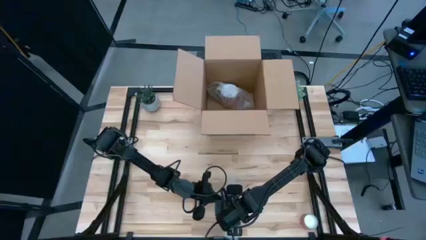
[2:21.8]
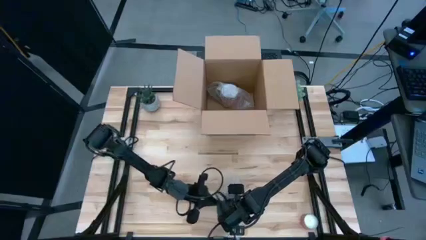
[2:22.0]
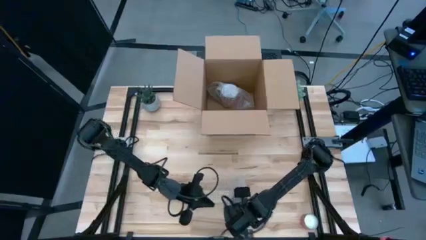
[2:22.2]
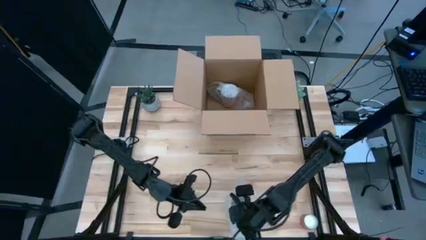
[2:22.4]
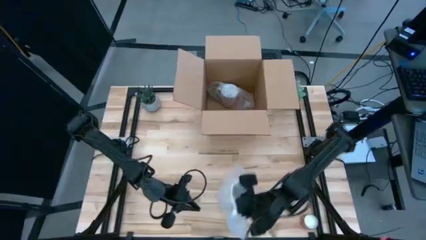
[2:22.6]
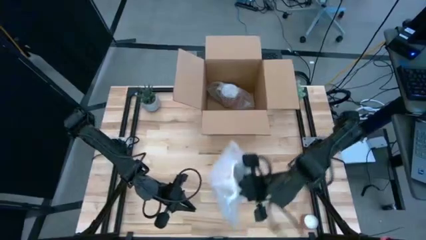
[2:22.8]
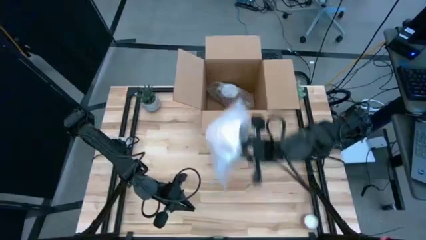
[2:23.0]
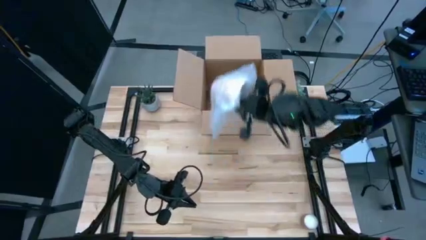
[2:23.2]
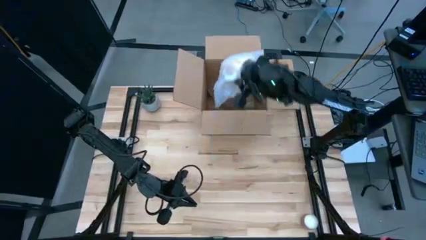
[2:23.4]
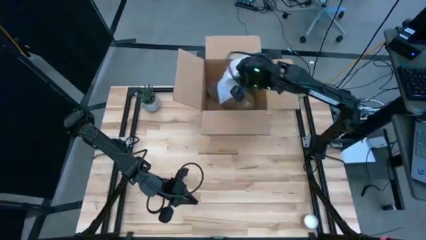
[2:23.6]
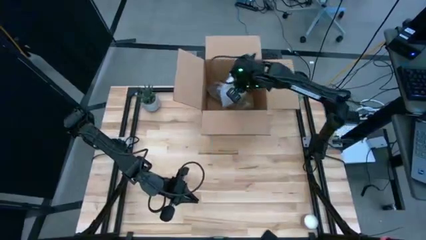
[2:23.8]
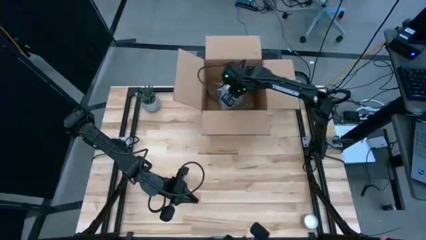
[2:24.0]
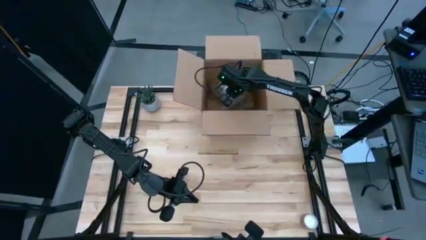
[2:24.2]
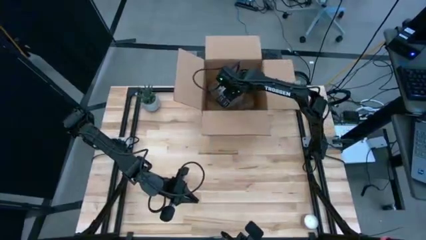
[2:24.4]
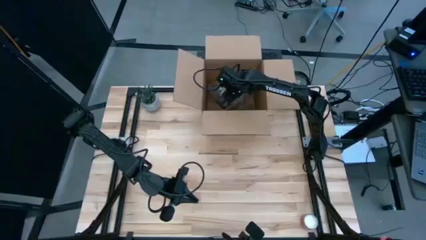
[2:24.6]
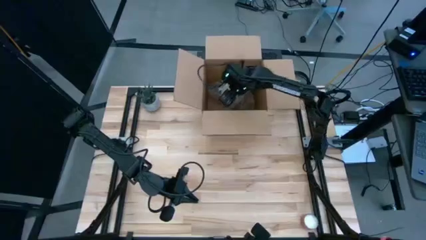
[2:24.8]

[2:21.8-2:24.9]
Task: wrap mug
Put the wrapped orange patterned mug into the cardboard box

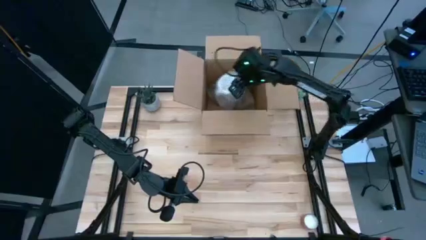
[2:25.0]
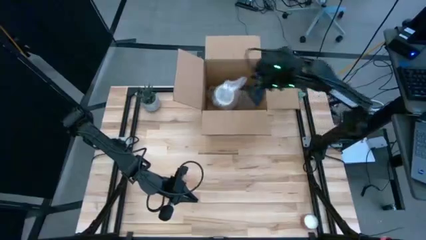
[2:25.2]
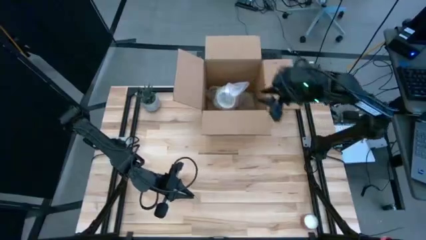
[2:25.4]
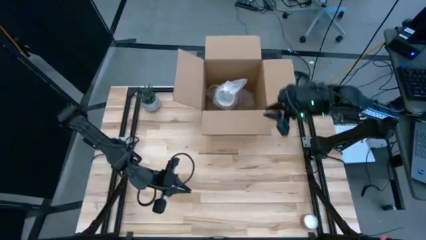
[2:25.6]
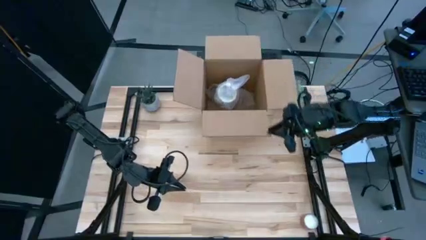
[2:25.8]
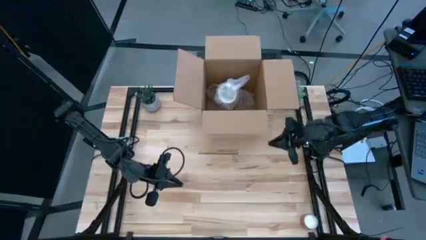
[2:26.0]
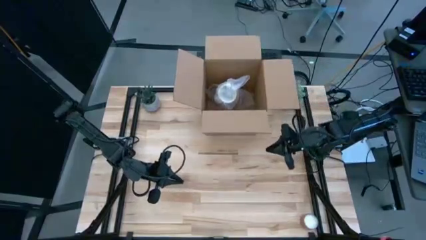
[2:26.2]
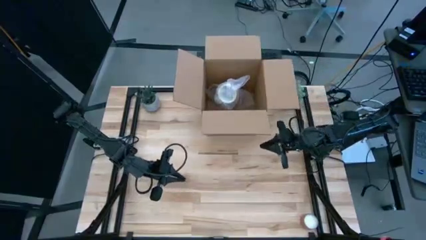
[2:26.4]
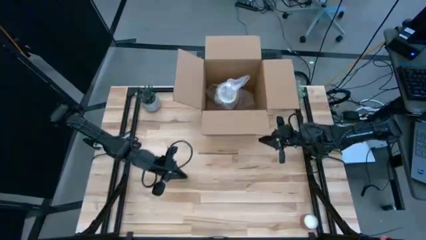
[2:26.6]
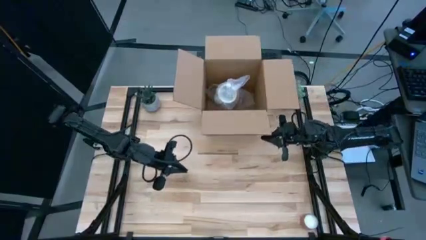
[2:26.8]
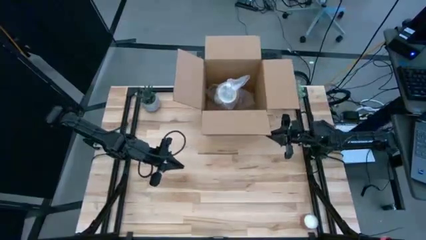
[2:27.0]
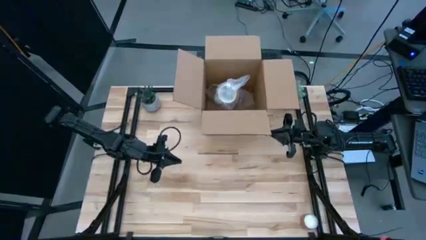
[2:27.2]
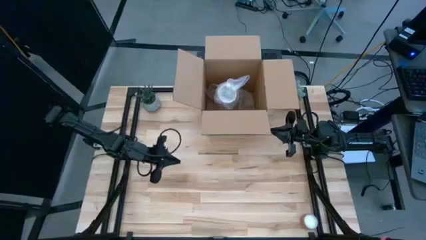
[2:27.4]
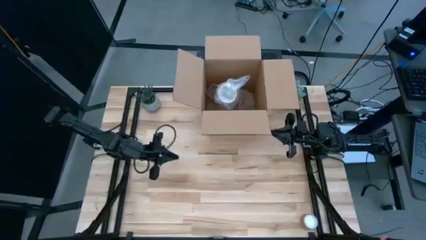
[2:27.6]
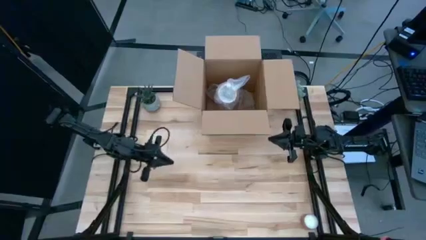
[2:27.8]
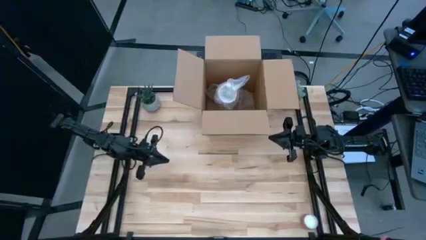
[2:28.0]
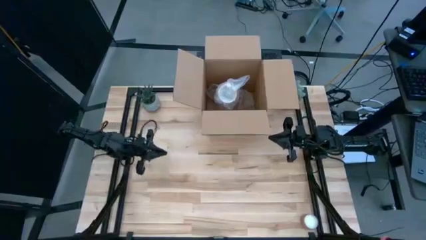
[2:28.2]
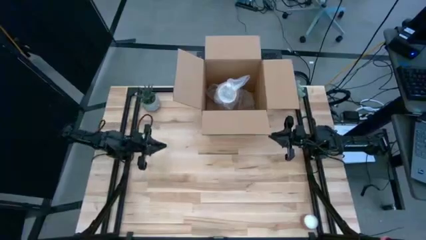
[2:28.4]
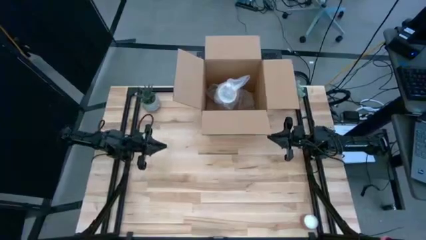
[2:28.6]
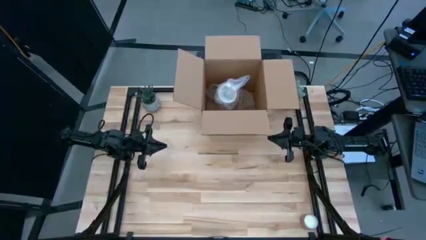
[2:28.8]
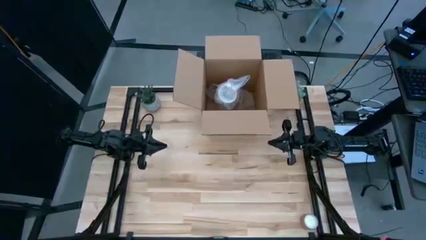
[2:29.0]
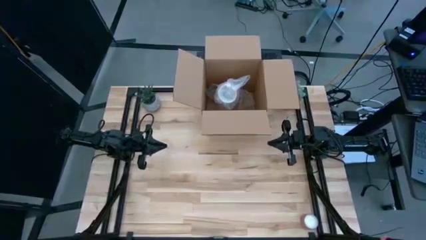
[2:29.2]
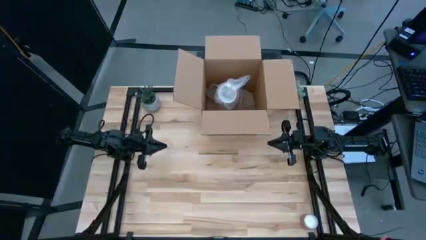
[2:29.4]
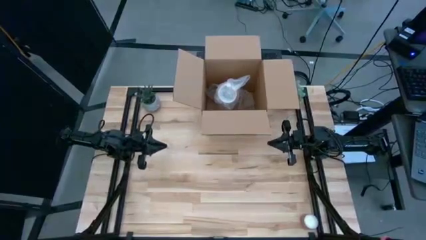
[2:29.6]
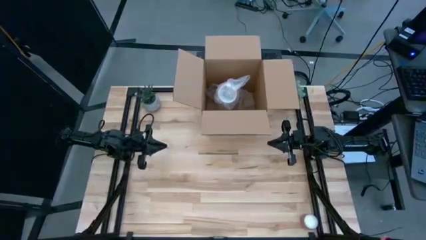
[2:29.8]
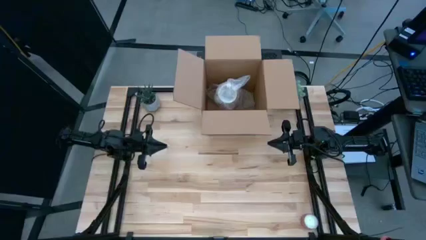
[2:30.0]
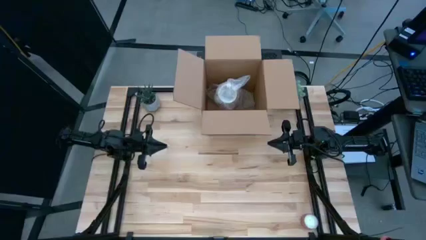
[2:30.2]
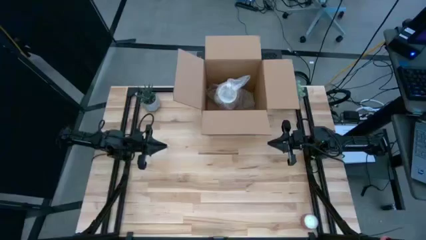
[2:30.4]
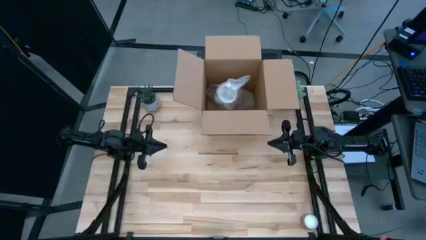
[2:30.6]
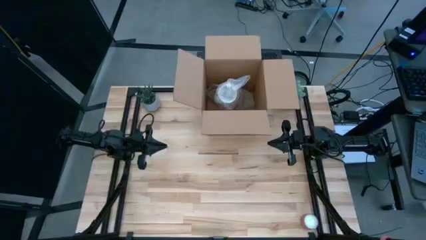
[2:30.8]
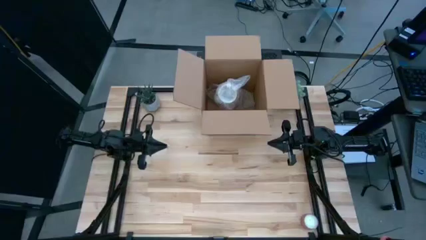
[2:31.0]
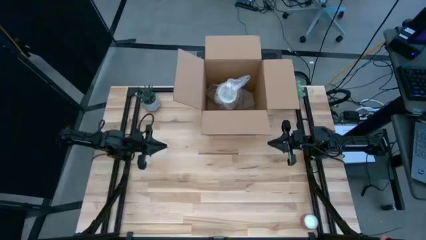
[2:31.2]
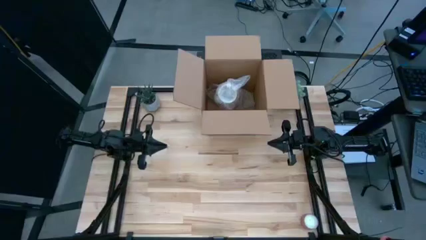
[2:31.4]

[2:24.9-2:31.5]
Return to Home Position

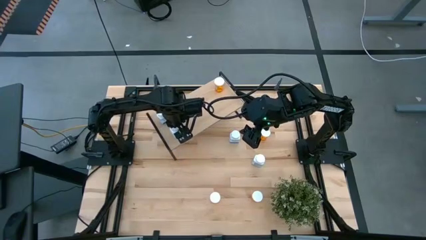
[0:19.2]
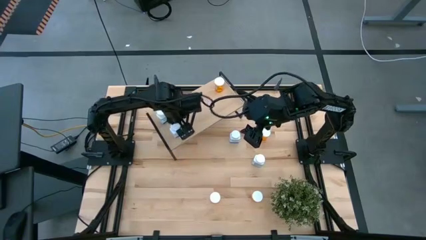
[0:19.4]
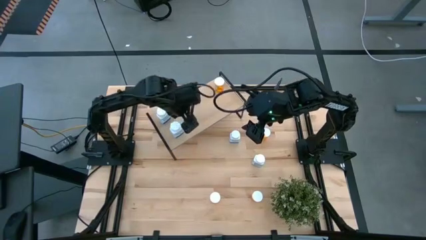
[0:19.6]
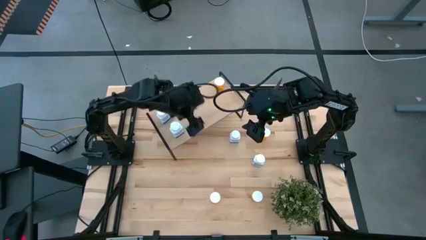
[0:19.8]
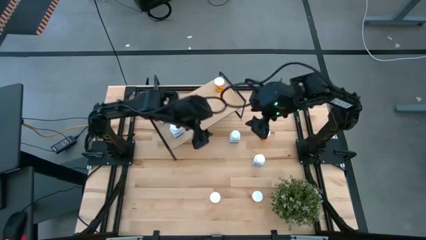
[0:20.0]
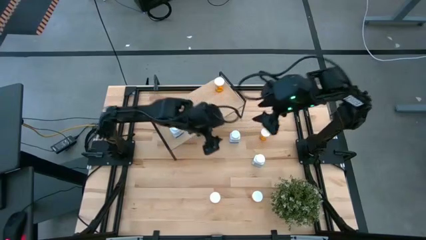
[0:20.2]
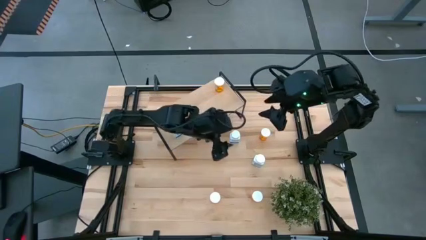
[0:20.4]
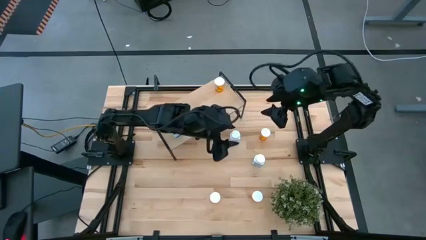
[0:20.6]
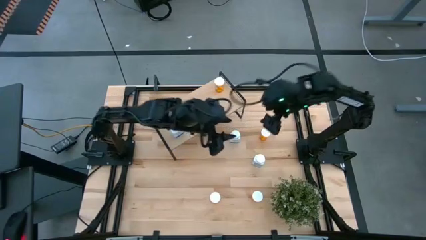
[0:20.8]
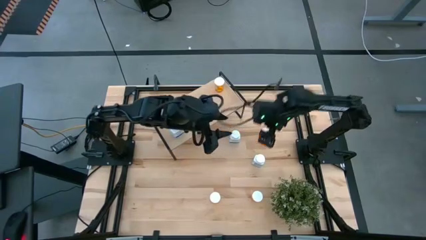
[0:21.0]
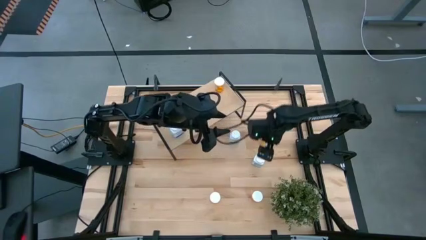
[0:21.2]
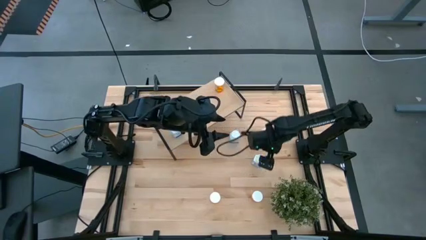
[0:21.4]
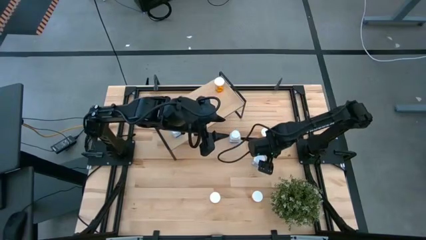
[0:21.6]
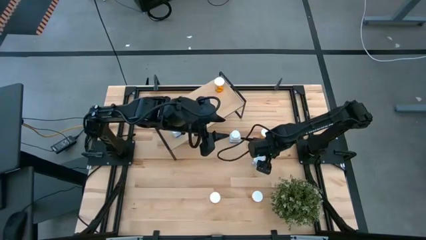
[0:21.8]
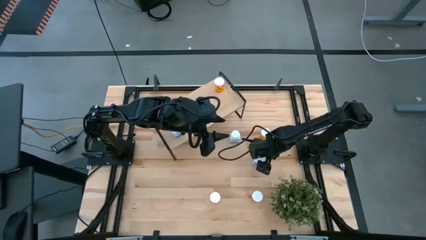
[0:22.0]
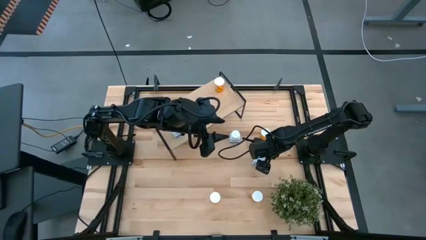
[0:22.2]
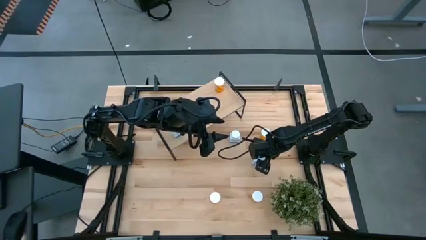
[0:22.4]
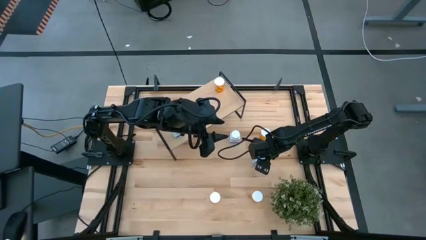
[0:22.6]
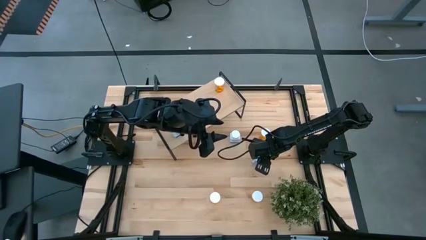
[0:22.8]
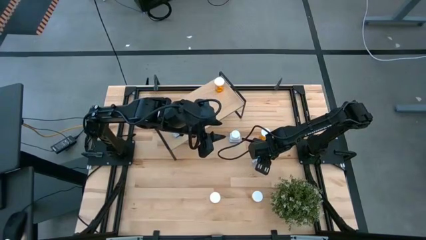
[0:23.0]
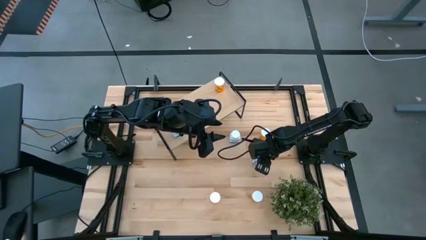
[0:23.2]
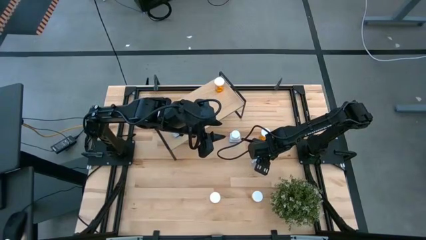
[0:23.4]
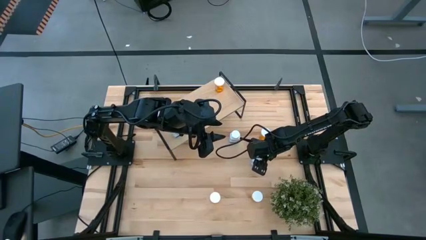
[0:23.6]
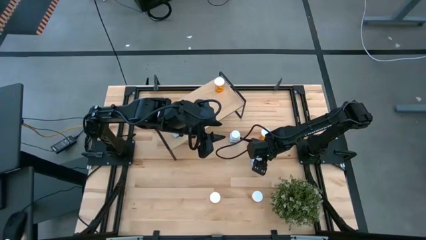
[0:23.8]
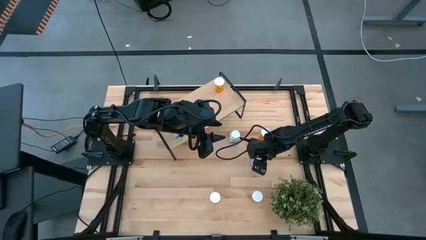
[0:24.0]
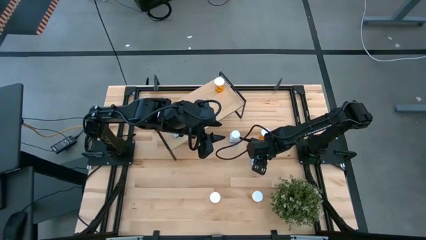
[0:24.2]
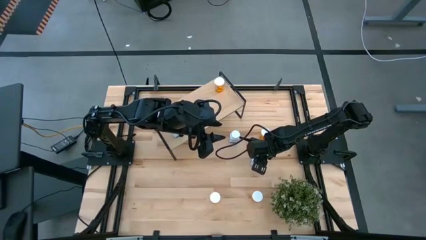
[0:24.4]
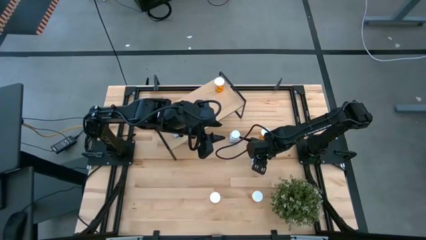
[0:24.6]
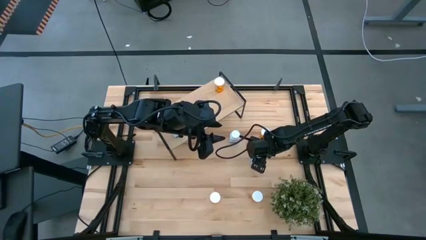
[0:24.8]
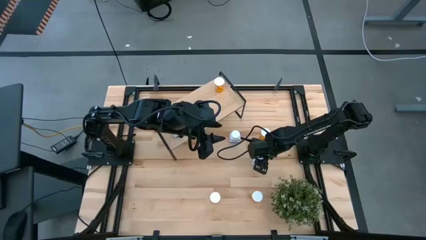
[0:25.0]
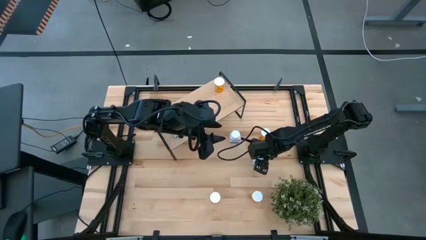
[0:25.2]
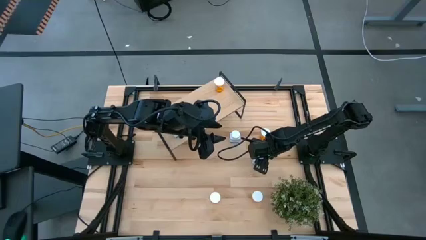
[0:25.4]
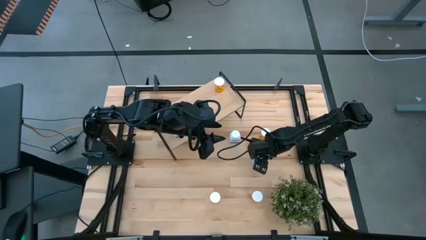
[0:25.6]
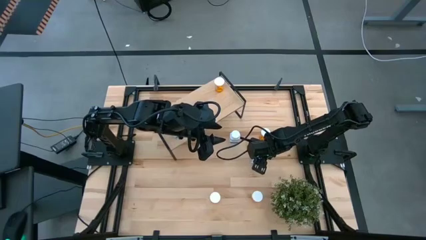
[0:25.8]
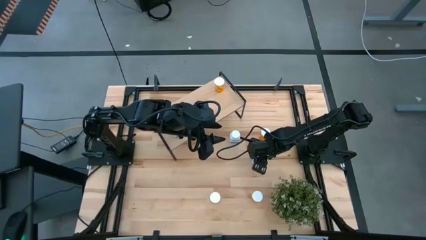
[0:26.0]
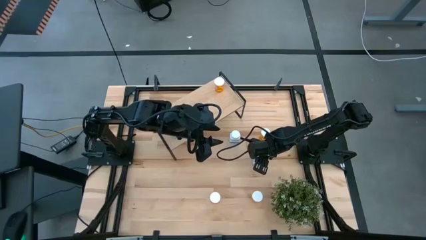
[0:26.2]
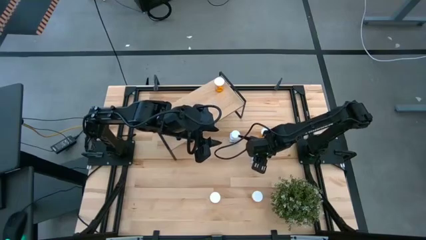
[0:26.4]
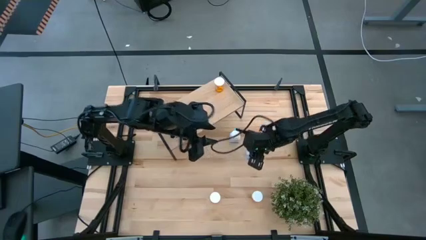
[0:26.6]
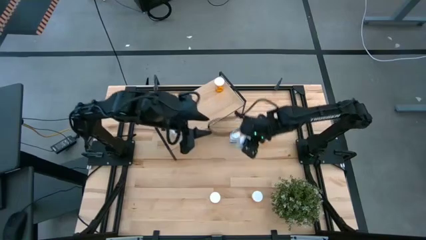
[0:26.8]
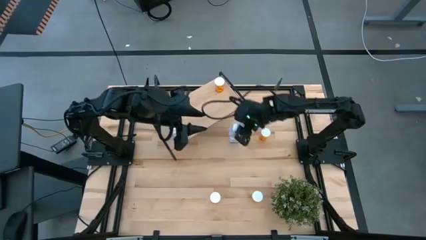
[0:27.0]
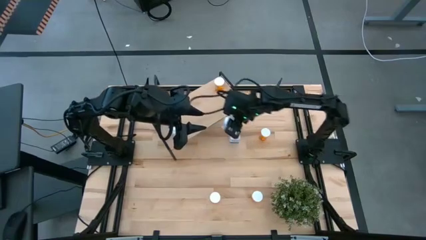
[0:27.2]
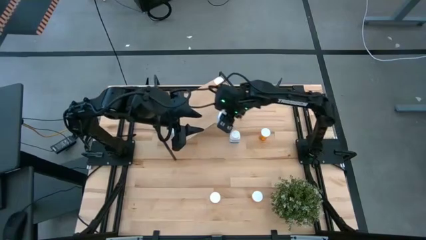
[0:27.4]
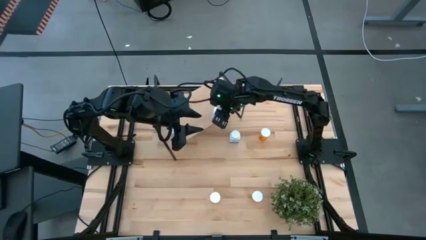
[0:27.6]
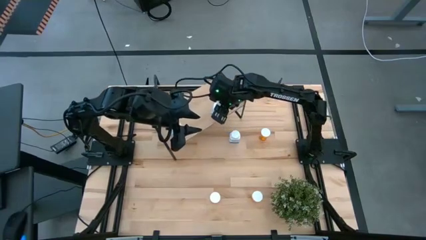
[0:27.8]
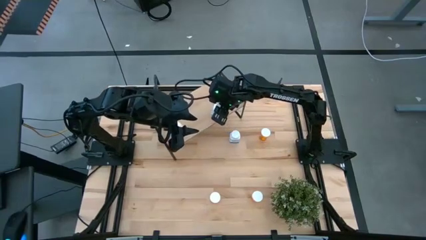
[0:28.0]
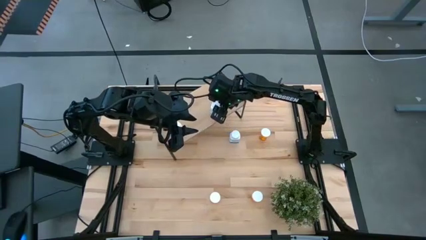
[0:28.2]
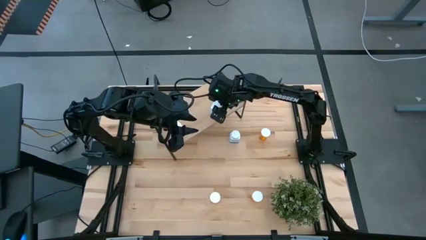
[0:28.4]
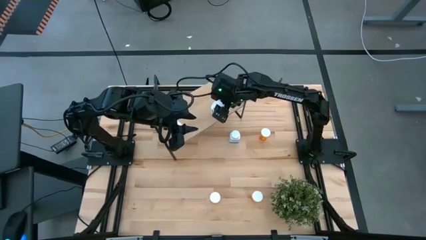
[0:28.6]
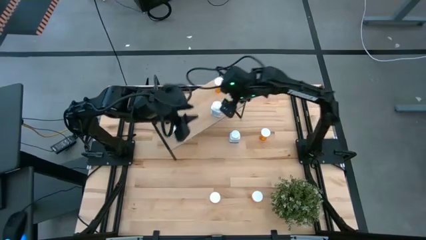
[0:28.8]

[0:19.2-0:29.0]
Task: Pick and place medicine bottles onto shelf by color
Put the white pill bottle on the shelf
